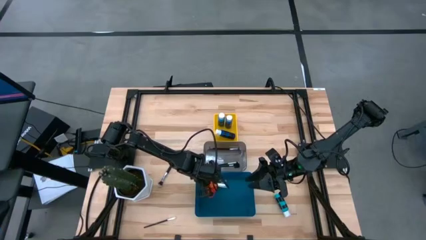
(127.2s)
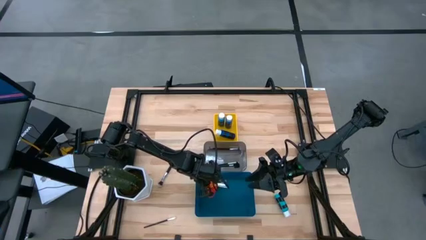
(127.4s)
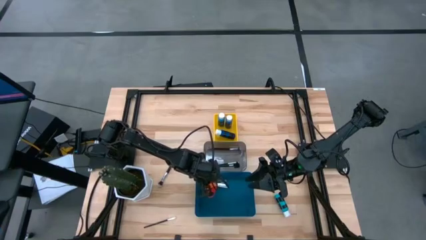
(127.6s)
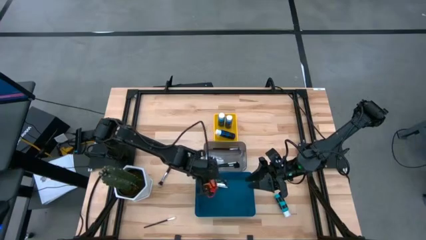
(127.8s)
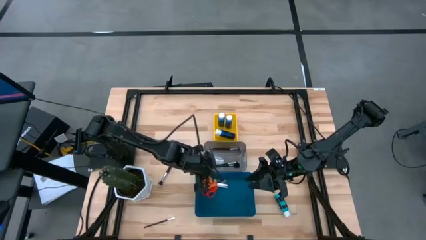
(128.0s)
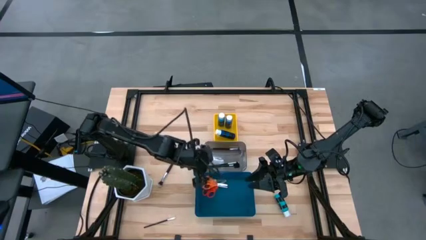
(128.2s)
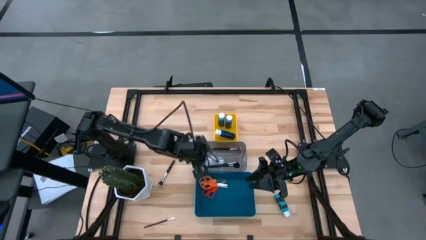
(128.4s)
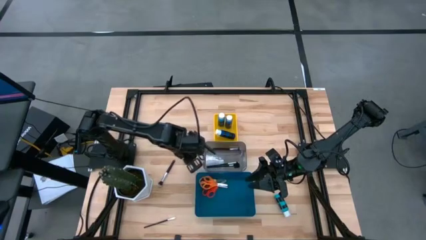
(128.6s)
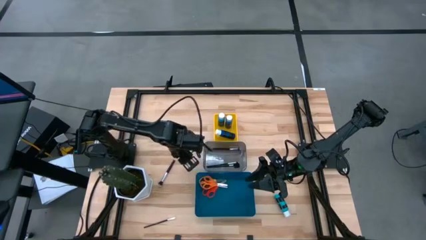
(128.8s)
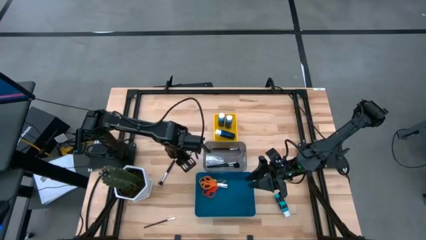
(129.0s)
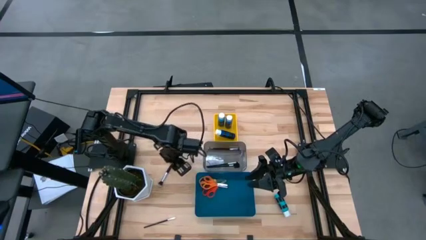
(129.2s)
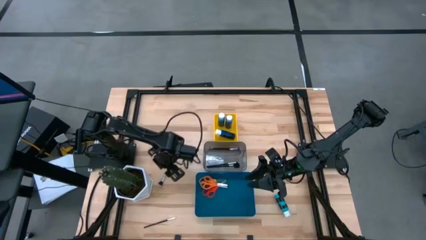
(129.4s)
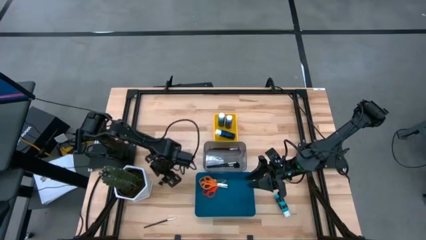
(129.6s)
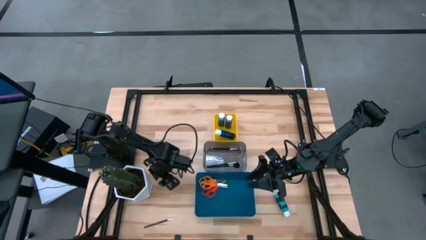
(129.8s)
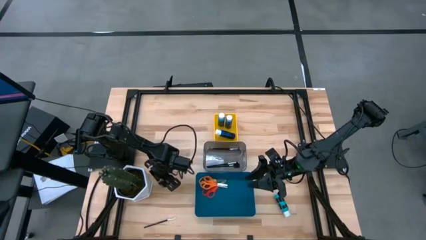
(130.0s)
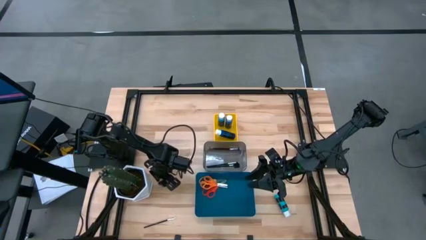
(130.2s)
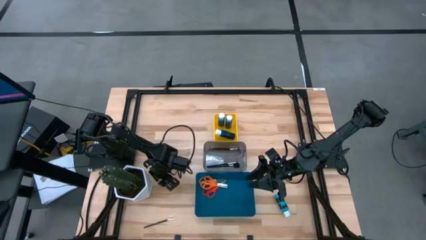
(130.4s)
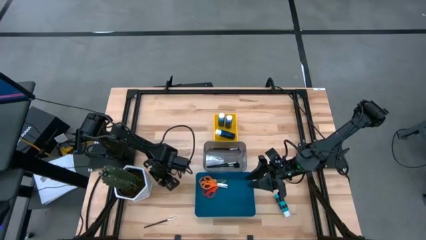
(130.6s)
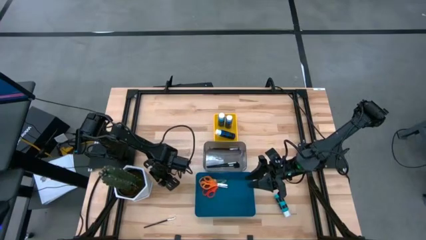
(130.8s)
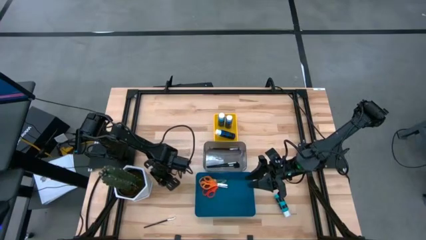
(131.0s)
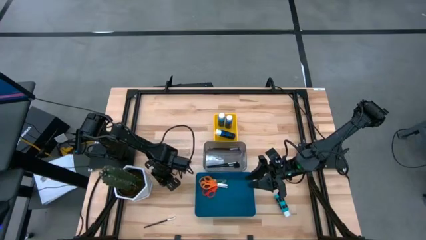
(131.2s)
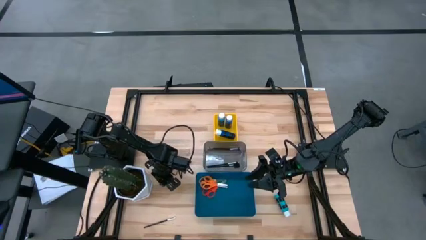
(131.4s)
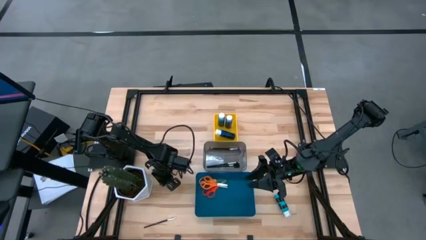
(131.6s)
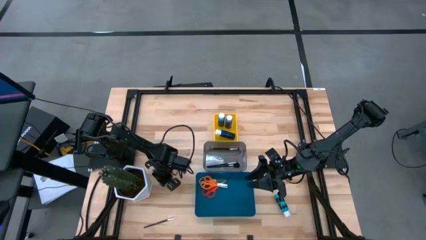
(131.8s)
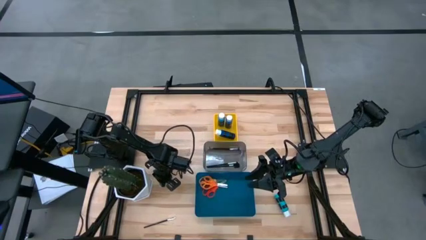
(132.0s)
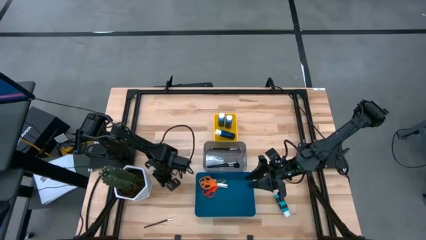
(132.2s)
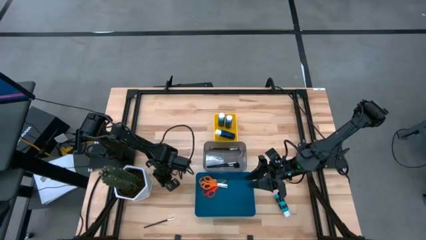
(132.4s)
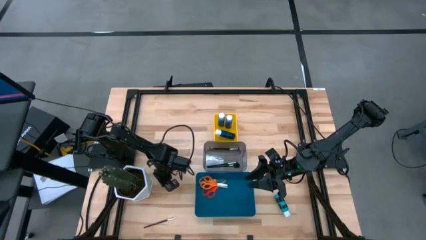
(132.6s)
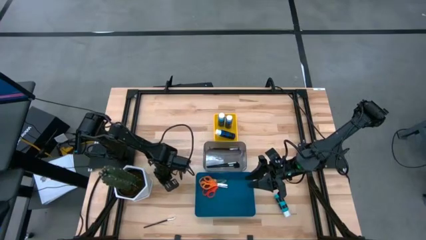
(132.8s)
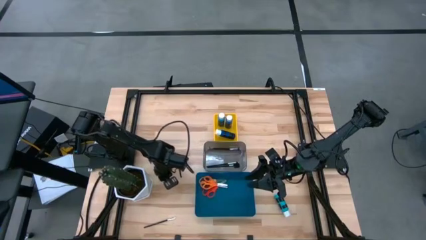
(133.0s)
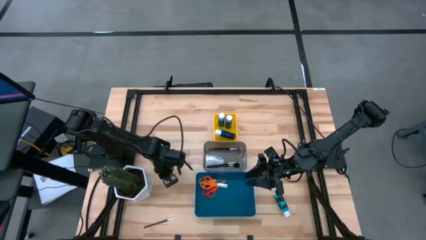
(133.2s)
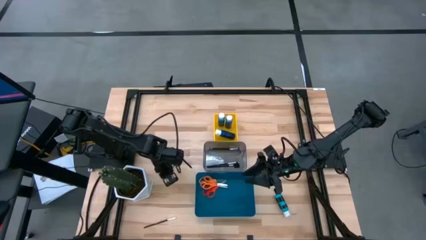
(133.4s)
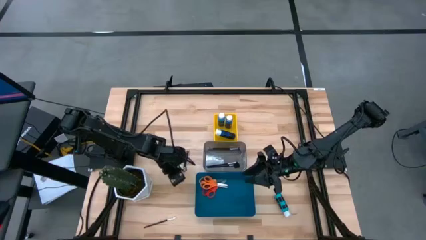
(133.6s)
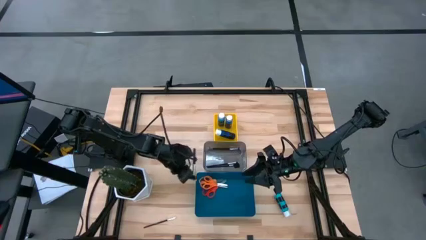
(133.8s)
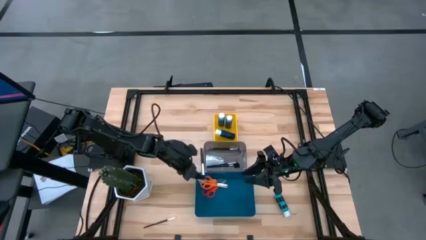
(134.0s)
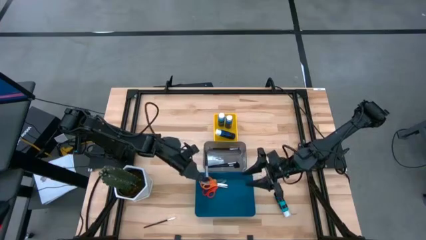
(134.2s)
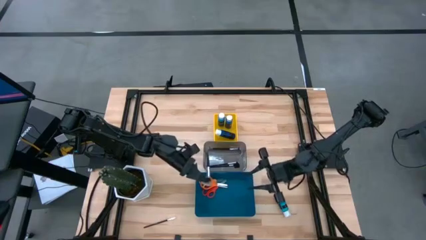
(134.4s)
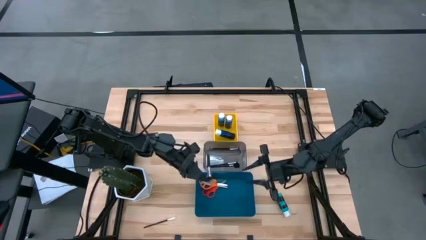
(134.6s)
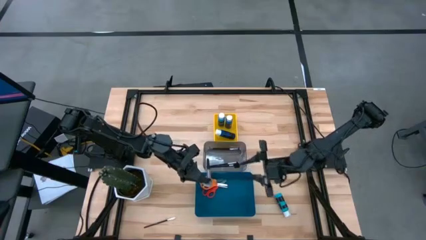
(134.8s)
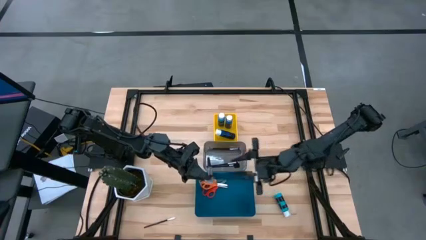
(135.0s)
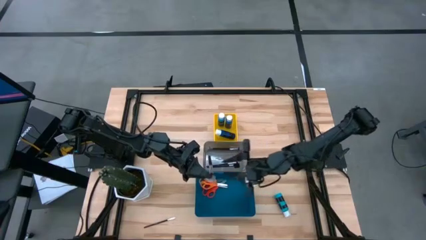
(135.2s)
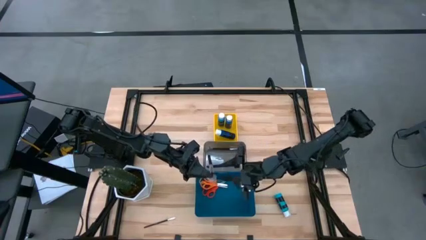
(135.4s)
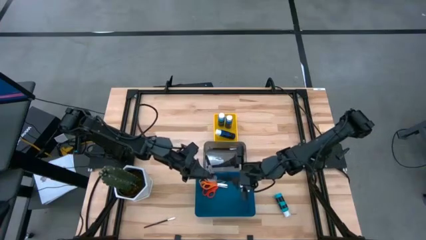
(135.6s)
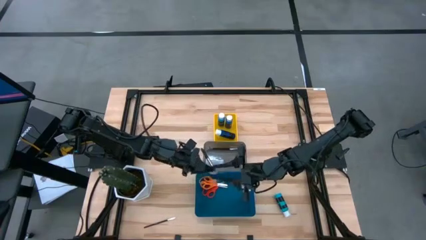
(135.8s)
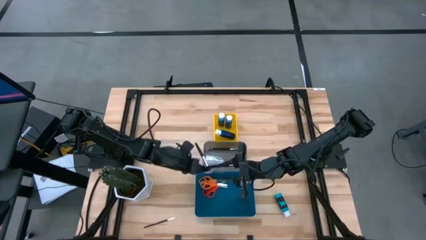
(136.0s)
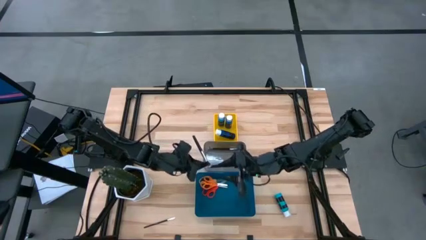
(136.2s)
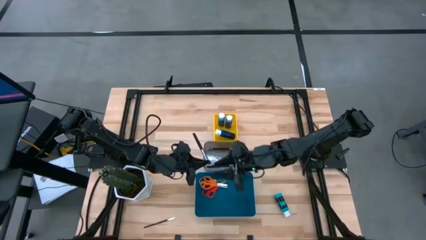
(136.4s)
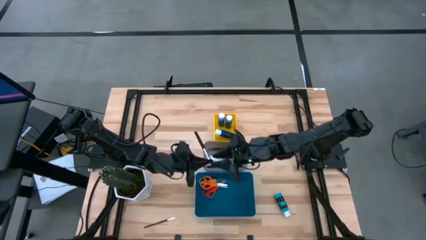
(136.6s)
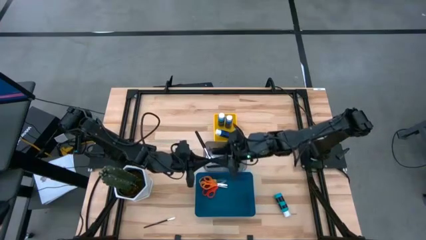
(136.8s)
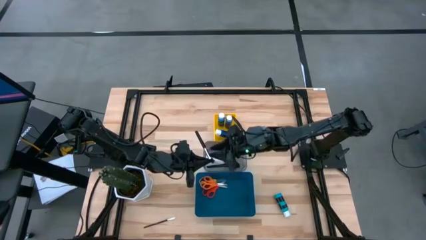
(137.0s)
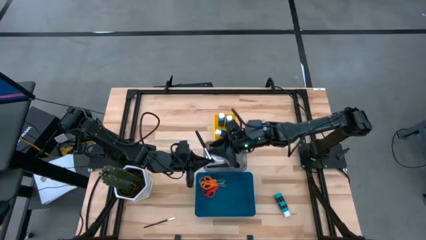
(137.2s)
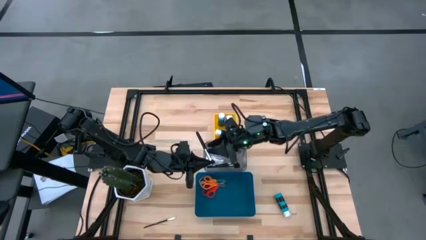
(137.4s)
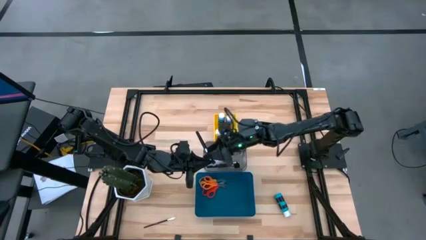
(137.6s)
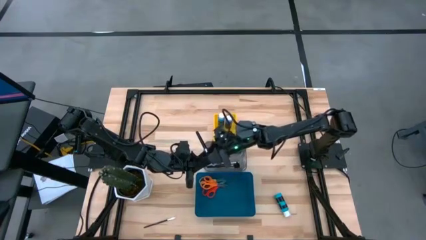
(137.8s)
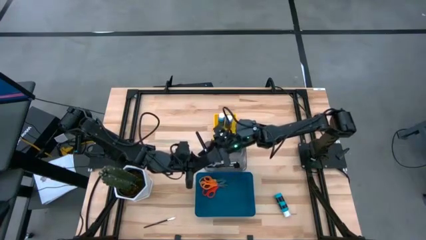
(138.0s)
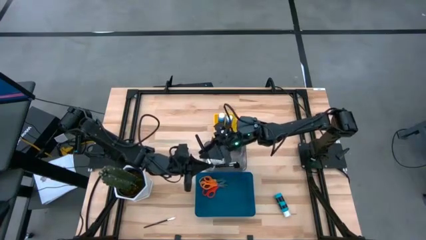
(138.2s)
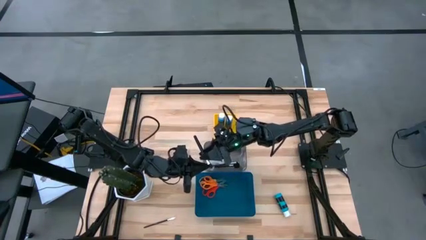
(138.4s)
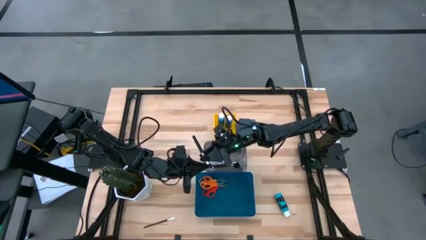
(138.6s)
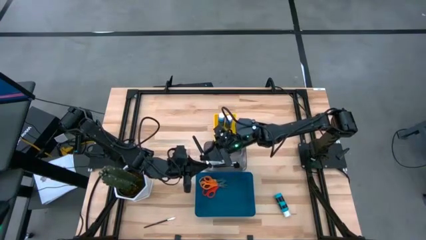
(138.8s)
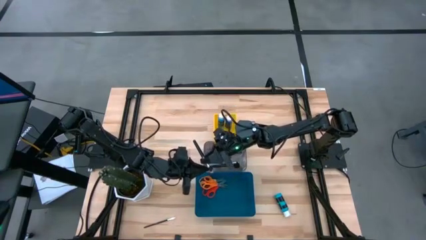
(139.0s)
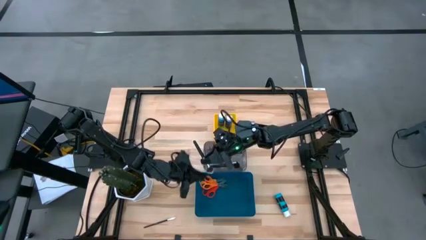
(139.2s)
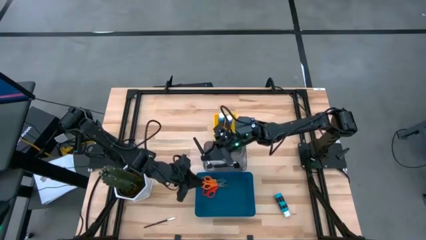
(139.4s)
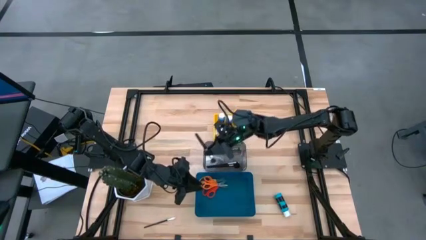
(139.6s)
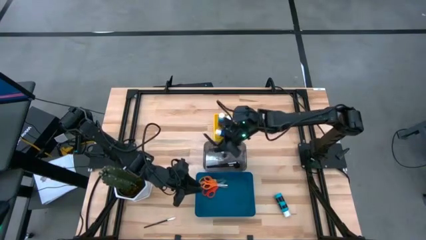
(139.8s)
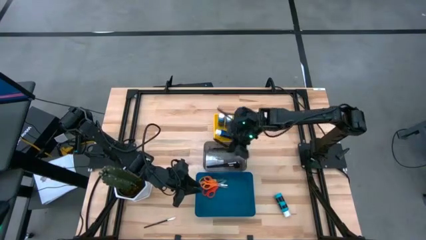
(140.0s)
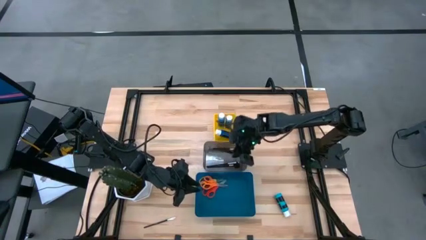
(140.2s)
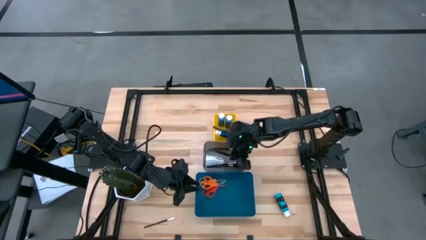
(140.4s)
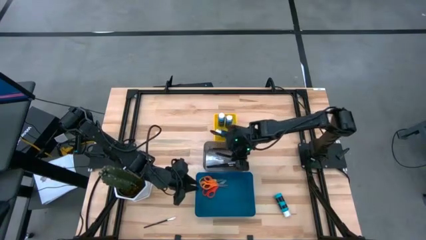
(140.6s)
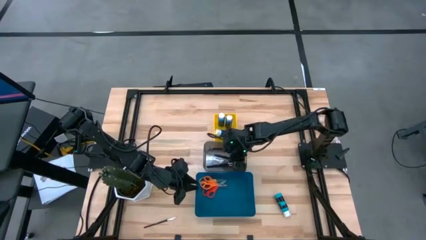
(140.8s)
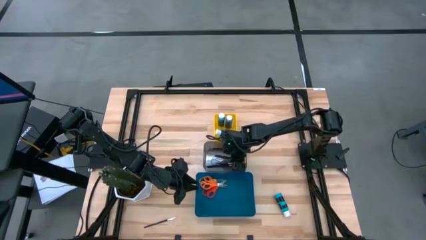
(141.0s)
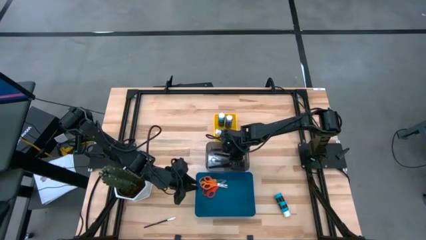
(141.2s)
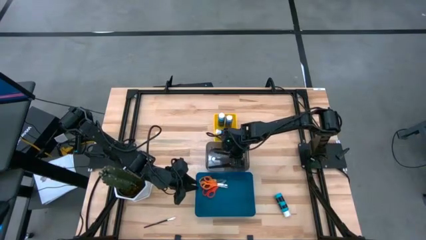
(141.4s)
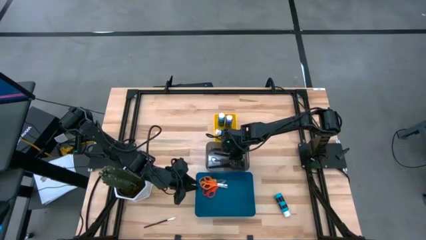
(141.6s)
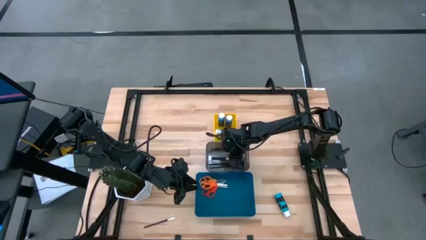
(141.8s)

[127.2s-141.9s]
Task: Pick & Place Paint Supplies
Put the makeup brush into the black bin
